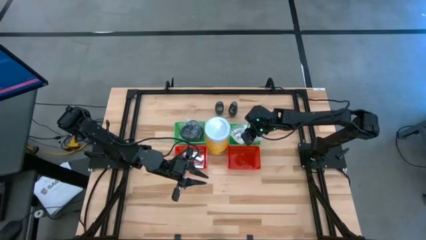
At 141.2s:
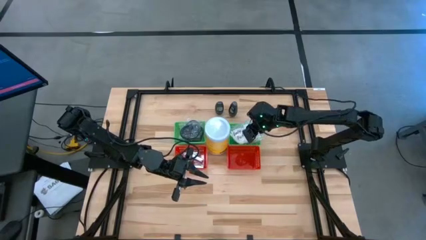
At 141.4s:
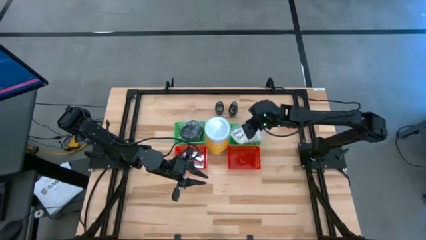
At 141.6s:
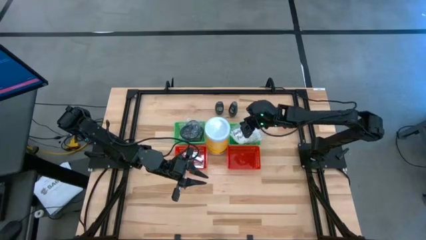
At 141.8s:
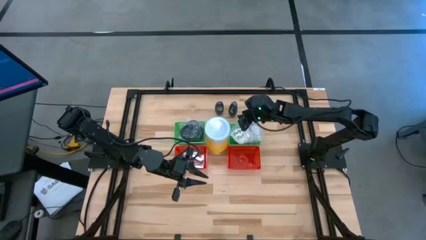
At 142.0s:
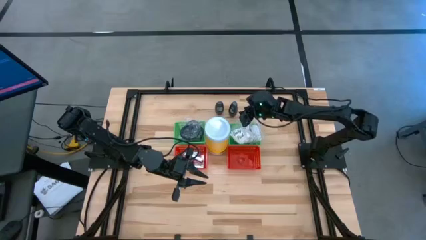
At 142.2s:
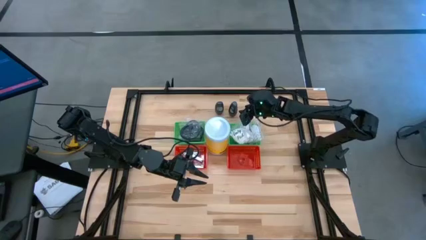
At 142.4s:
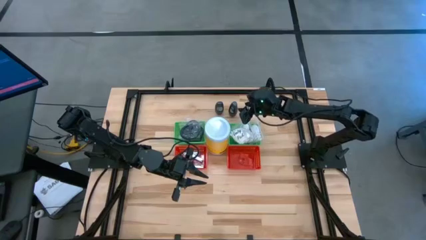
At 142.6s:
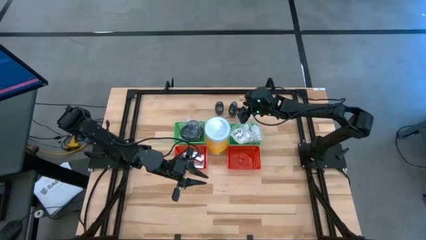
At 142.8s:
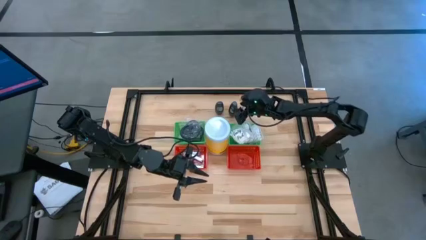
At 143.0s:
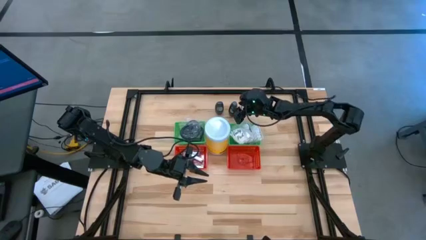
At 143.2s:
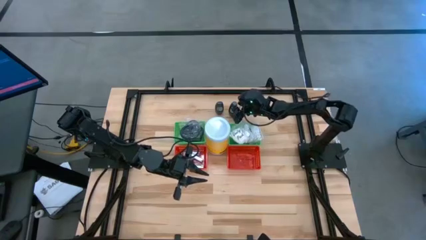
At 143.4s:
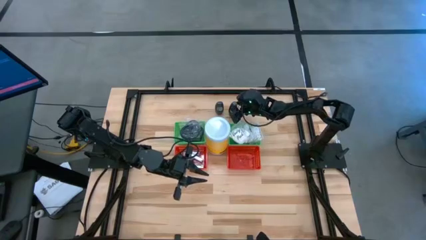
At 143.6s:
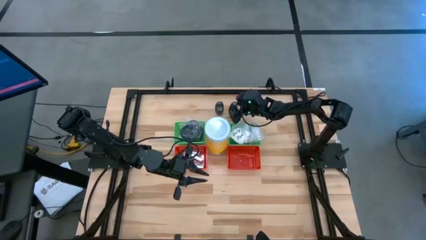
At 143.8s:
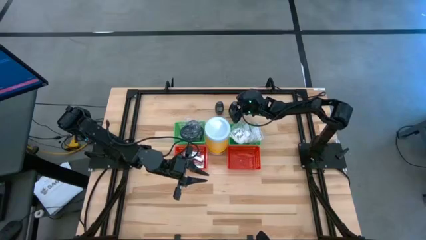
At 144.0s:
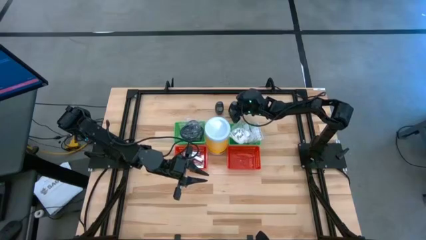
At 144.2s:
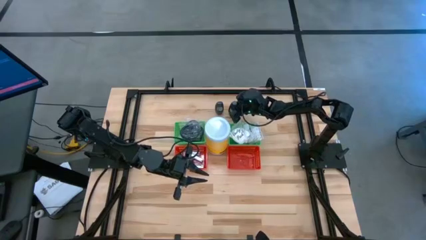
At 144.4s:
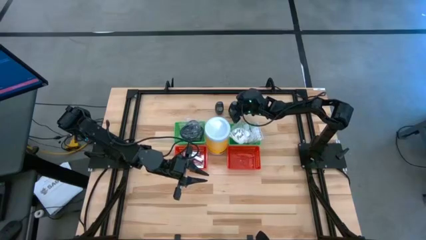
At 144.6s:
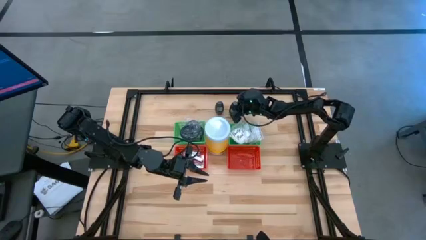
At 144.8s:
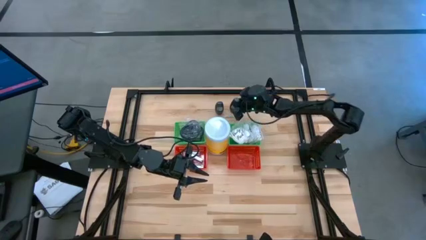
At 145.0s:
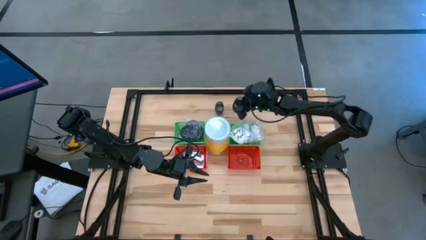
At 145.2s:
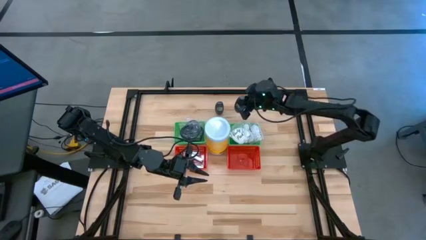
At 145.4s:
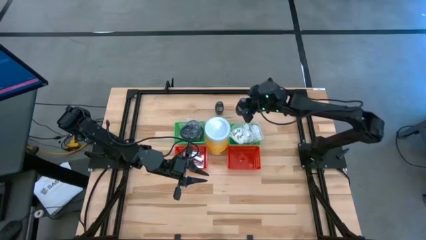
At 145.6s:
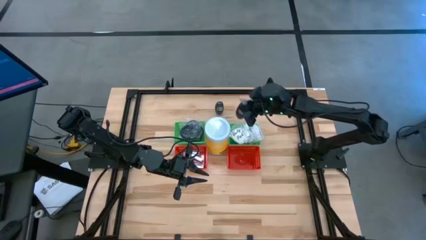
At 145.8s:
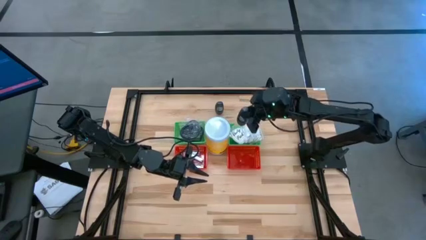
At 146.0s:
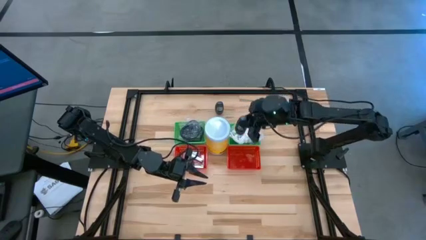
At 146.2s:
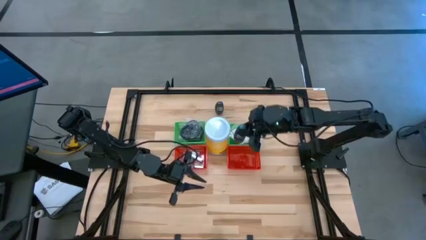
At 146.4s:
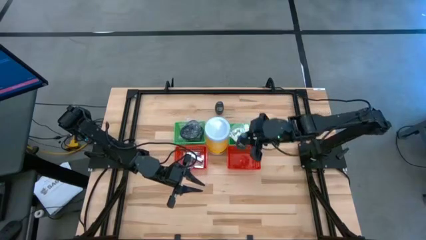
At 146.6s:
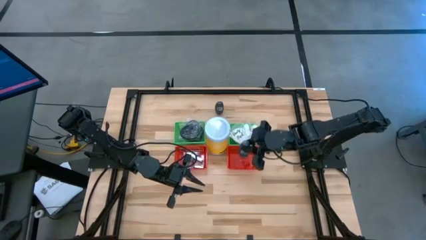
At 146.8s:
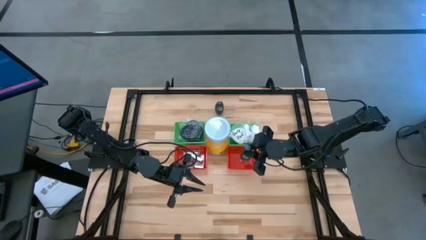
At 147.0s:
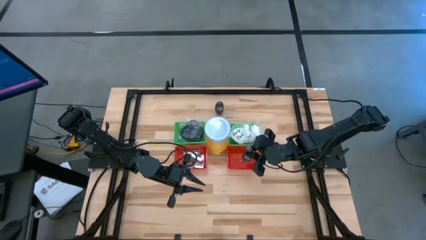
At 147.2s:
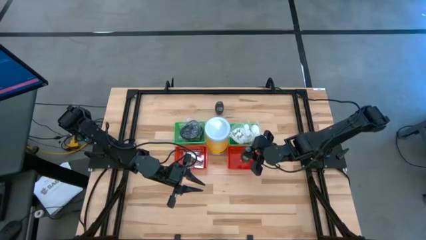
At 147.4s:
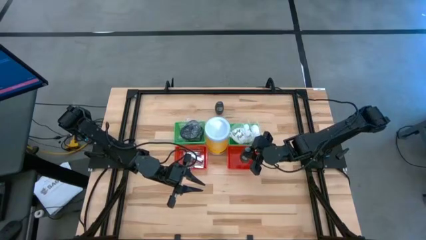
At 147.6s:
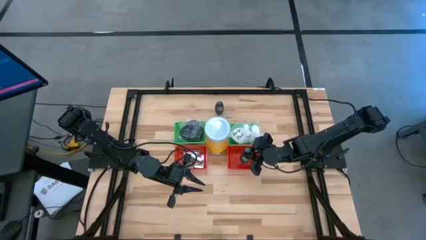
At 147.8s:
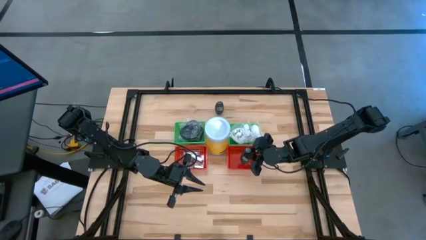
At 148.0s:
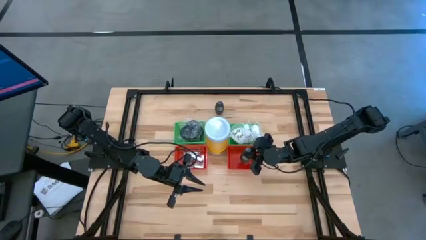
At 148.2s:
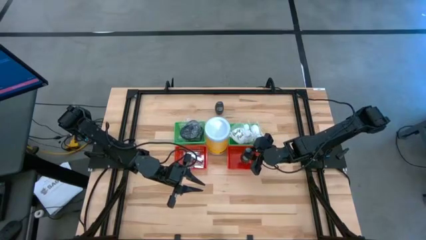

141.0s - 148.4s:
Task: Pick & Place Travel size toiletries
Put the right deodorant into the right red basket

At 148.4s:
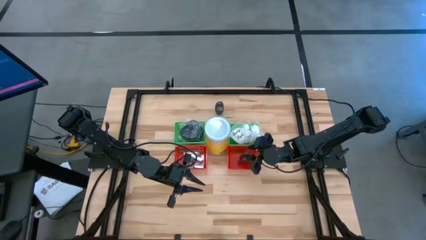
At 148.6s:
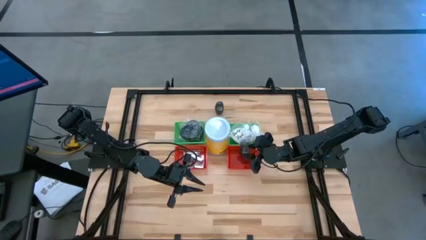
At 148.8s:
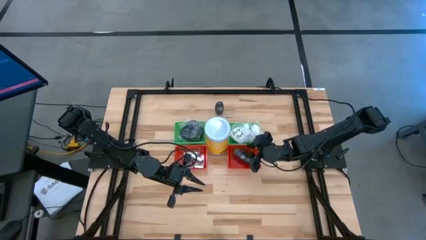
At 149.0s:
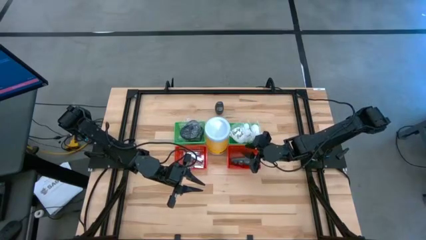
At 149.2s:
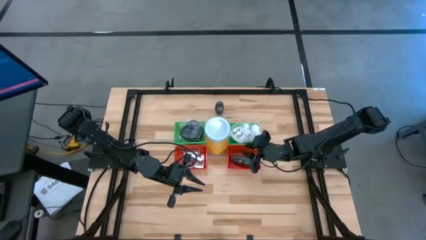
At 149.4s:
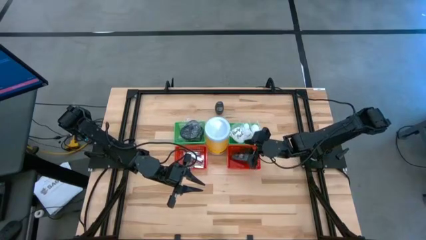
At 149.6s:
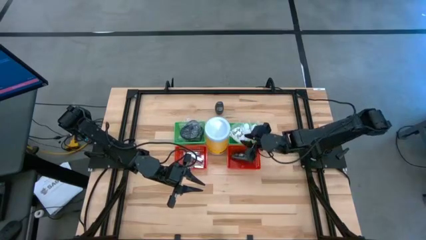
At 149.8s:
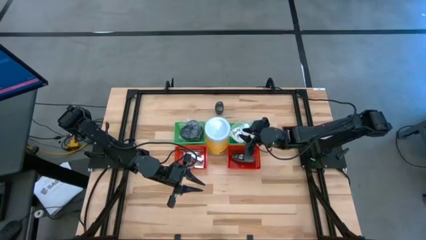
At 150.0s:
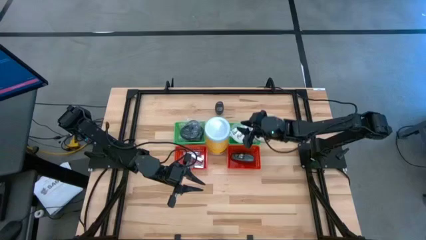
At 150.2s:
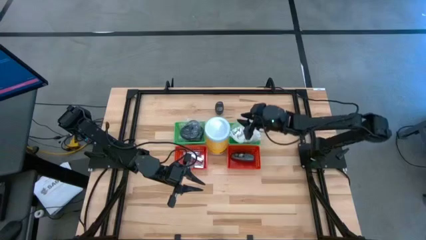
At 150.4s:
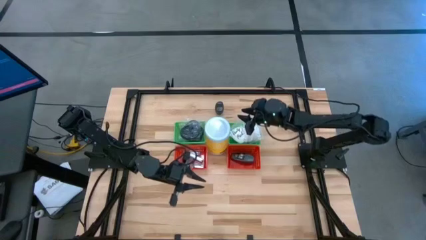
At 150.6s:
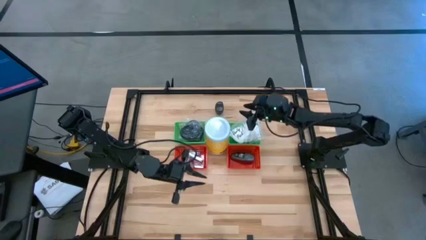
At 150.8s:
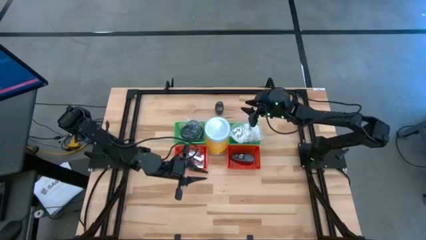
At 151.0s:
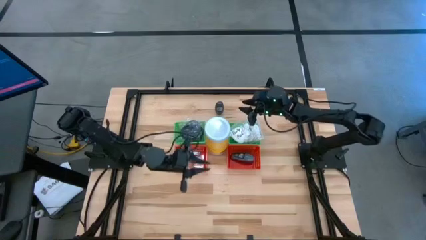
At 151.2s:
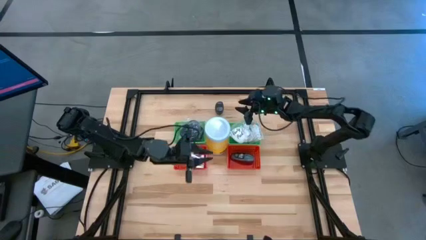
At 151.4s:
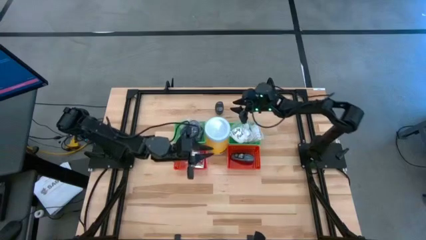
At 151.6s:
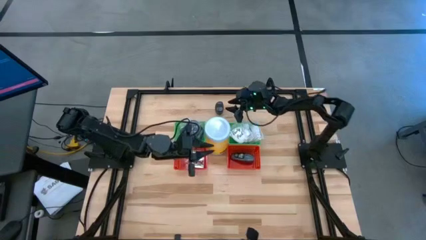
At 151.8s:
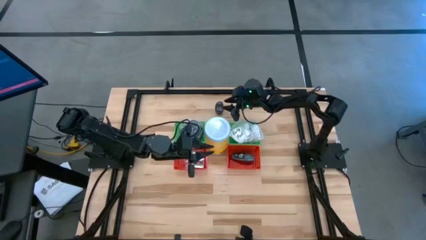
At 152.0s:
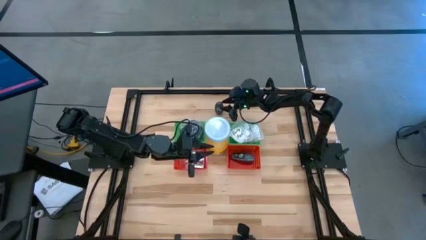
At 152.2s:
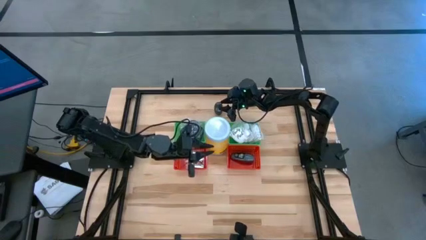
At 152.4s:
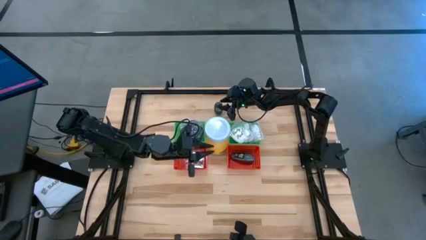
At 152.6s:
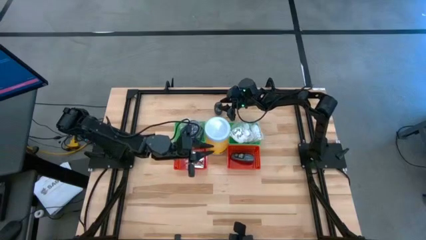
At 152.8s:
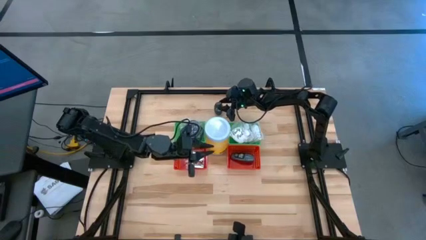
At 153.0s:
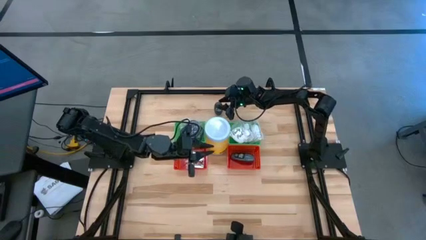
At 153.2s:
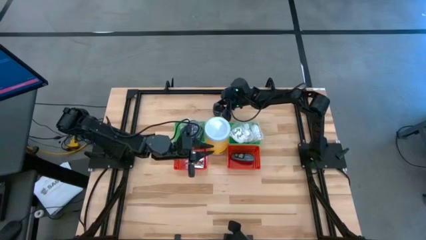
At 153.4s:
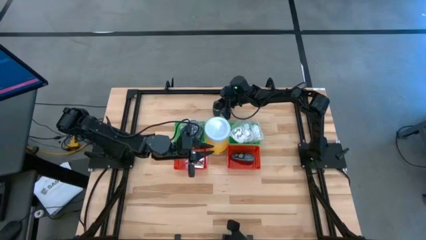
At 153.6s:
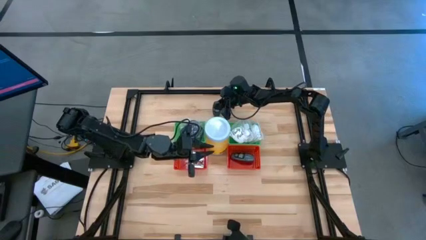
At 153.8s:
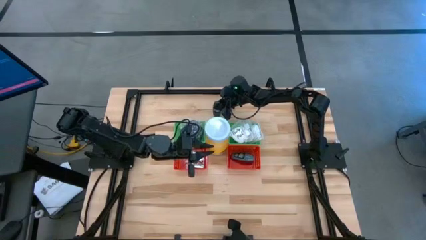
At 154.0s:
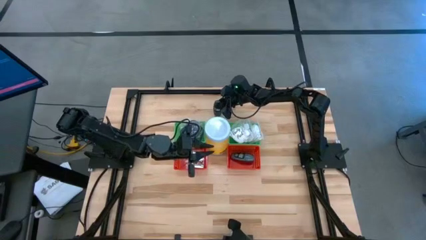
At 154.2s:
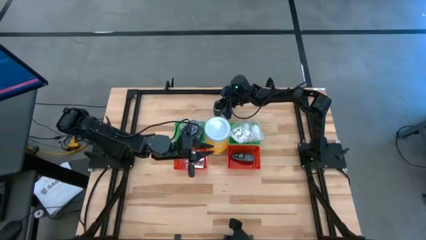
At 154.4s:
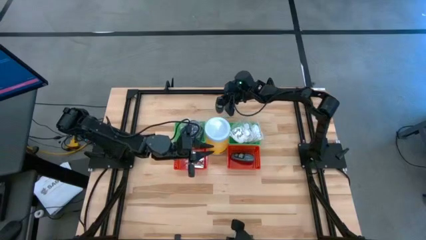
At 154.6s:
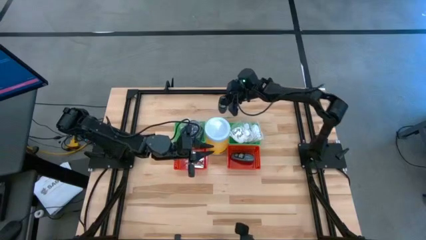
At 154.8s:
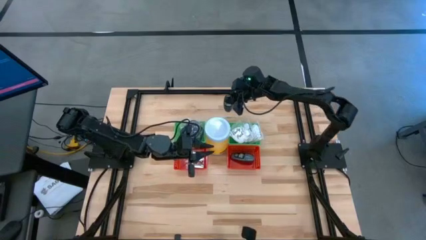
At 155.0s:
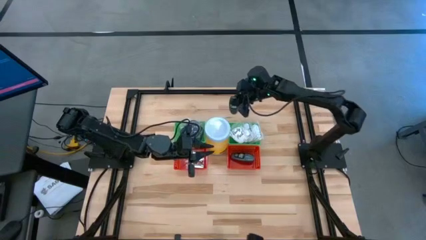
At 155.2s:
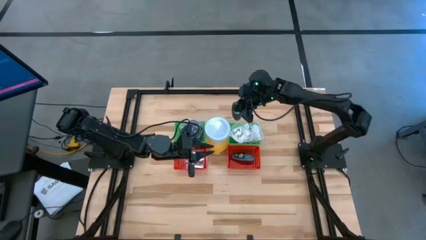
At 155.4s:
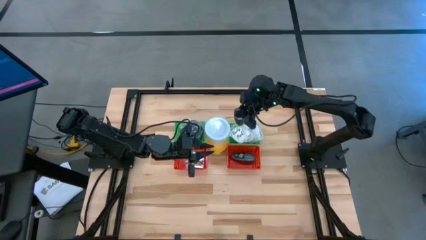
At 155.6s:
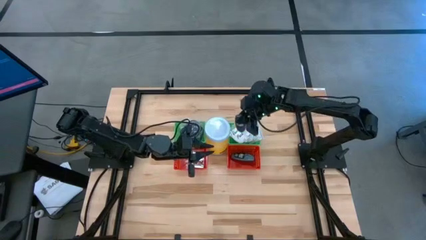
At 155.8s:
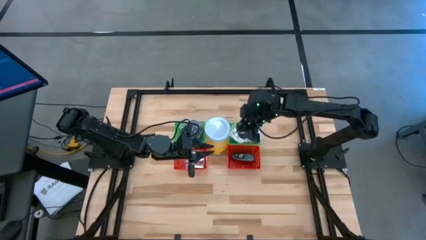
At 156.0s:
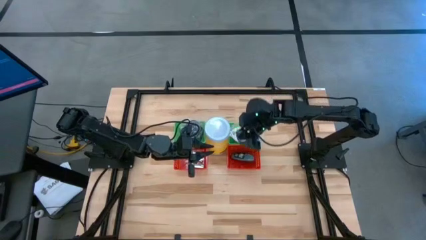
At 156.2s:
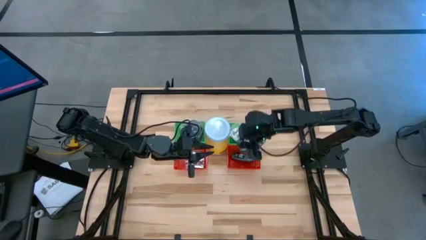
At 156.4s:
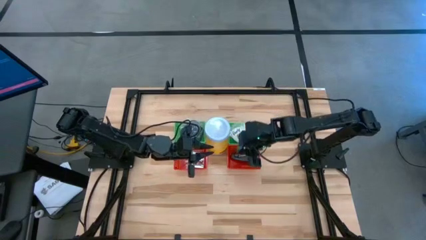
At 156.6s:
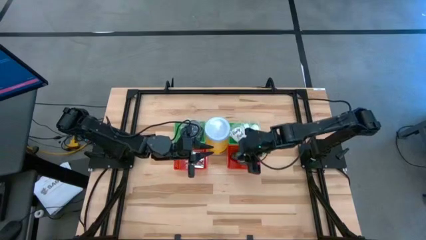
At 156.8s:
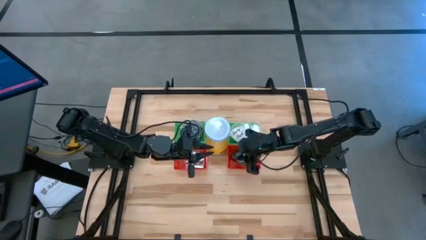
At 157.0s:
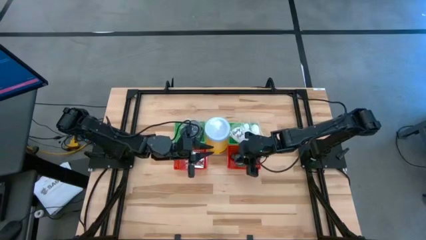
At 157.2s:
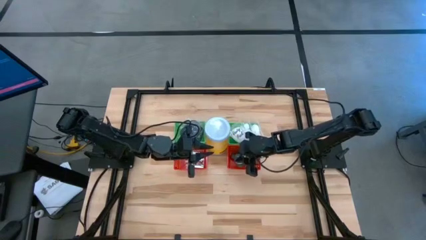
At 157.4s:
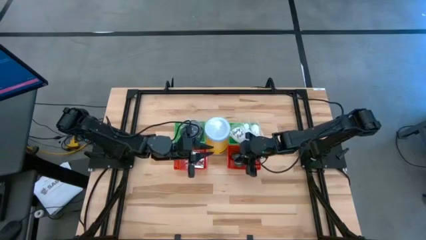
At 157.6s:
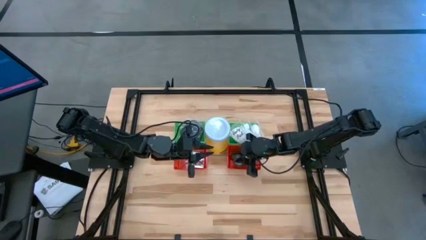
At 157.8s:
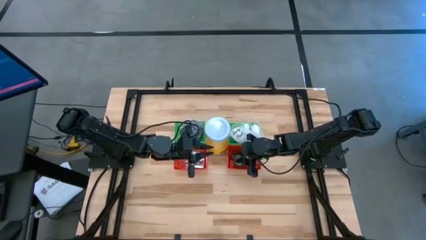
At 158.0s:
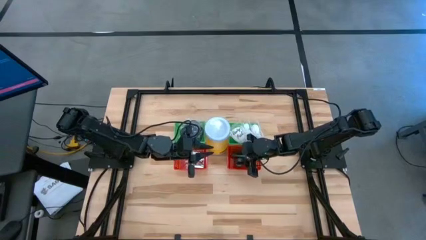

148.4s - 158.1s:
Put the deodorant into the right red basket
